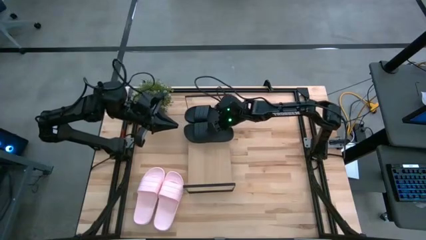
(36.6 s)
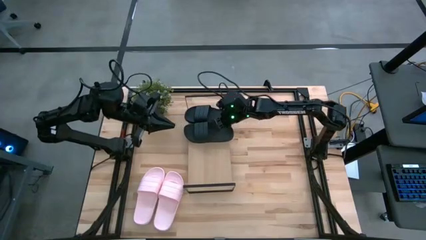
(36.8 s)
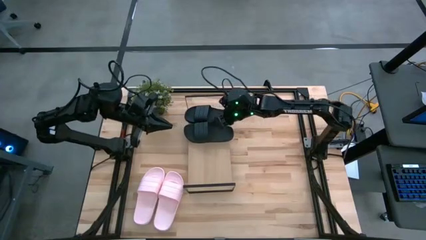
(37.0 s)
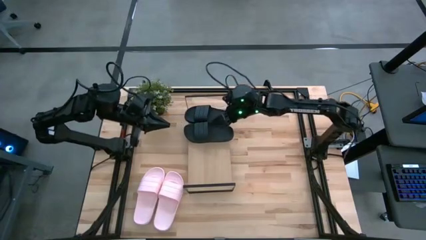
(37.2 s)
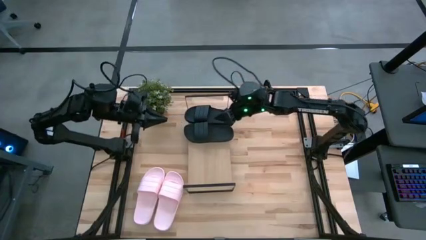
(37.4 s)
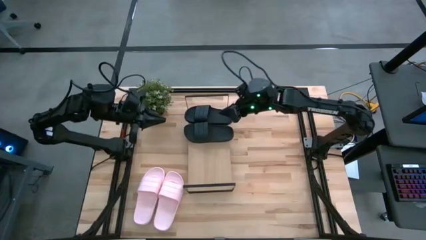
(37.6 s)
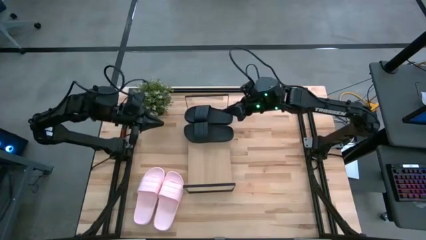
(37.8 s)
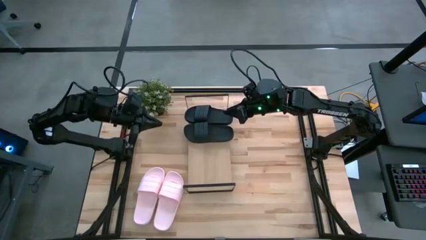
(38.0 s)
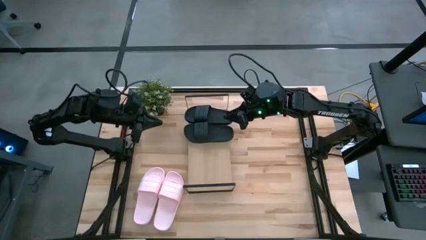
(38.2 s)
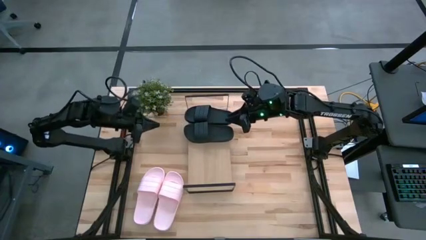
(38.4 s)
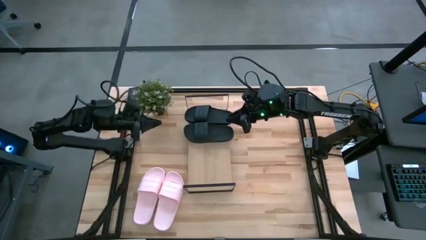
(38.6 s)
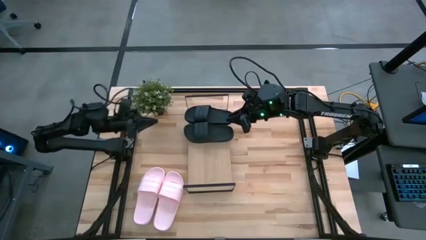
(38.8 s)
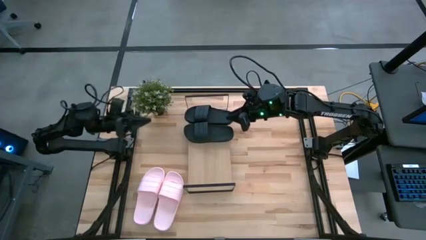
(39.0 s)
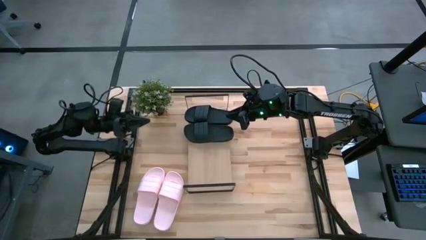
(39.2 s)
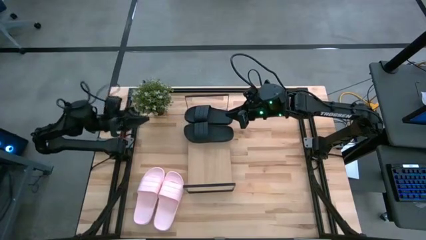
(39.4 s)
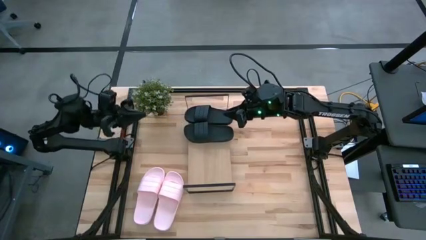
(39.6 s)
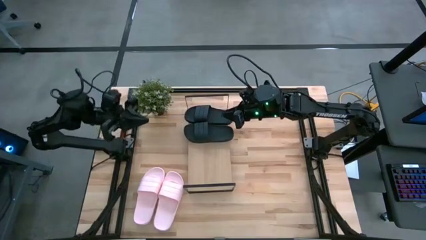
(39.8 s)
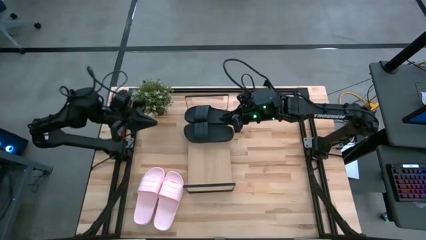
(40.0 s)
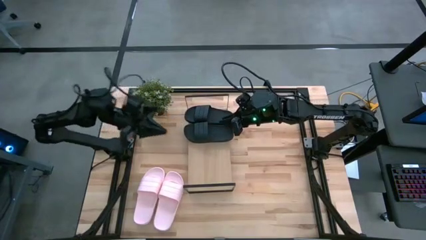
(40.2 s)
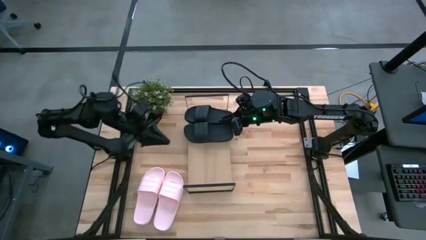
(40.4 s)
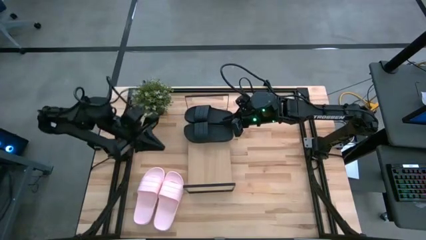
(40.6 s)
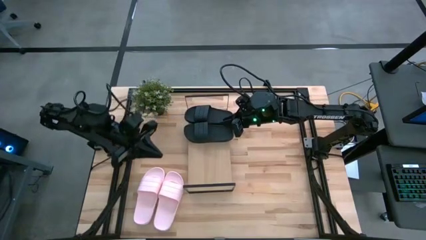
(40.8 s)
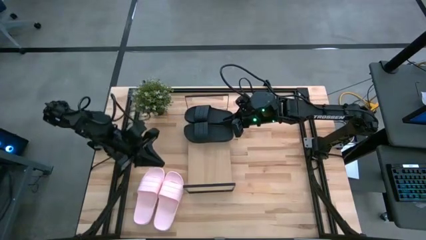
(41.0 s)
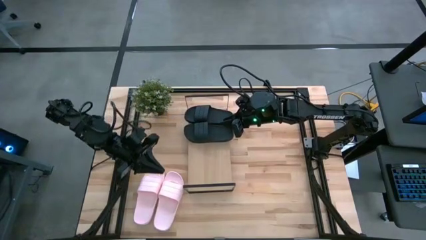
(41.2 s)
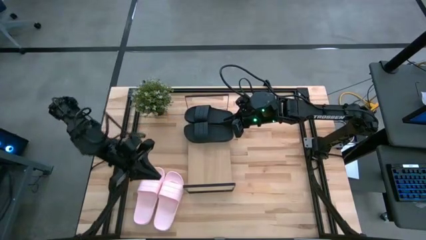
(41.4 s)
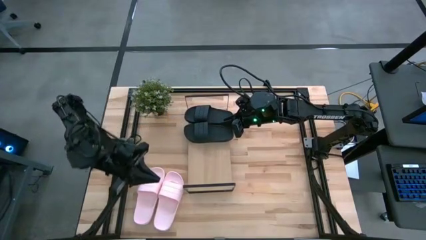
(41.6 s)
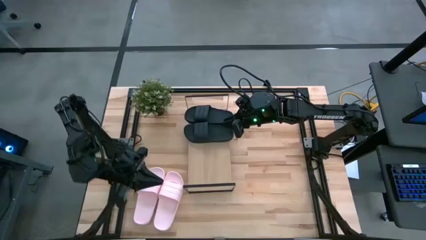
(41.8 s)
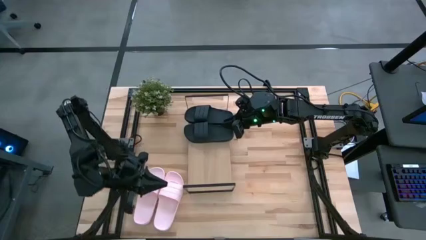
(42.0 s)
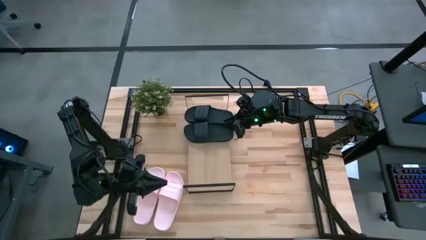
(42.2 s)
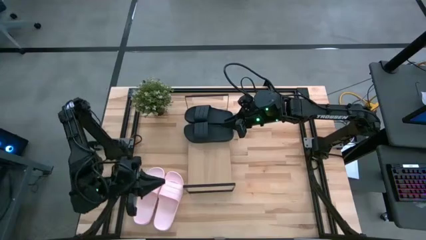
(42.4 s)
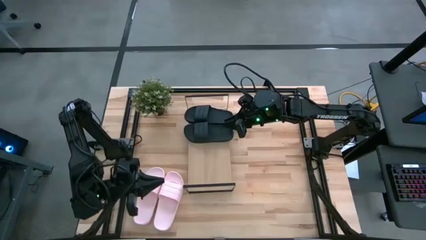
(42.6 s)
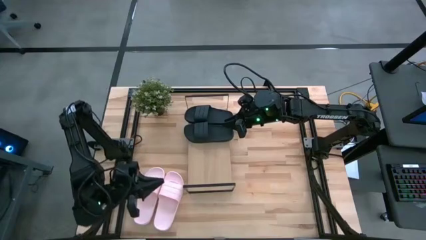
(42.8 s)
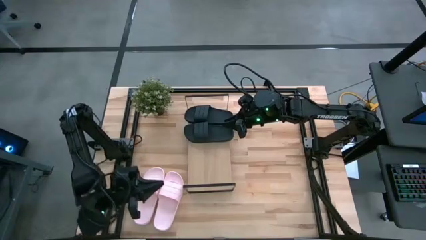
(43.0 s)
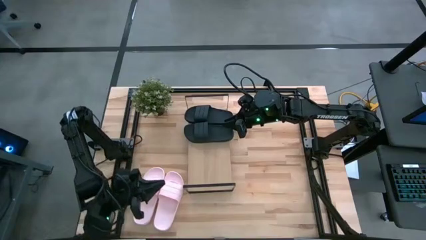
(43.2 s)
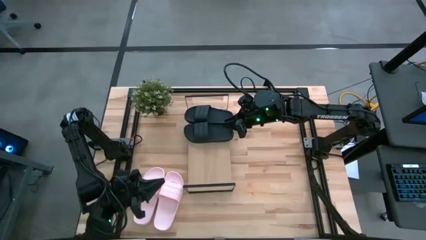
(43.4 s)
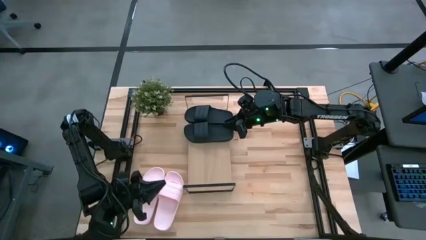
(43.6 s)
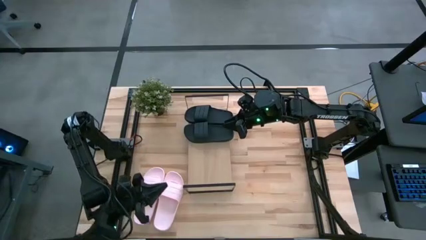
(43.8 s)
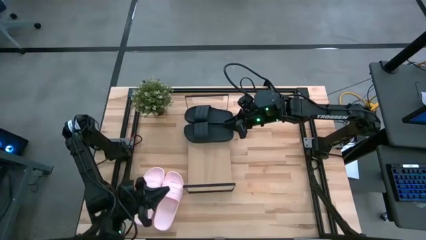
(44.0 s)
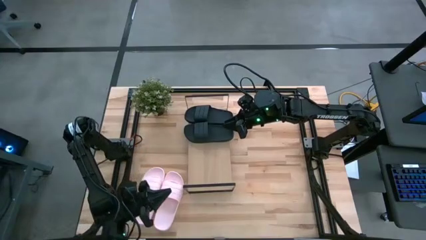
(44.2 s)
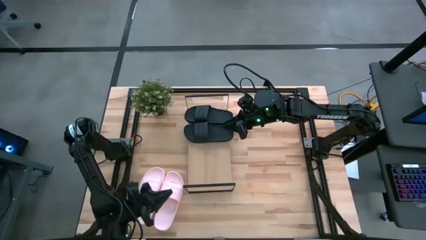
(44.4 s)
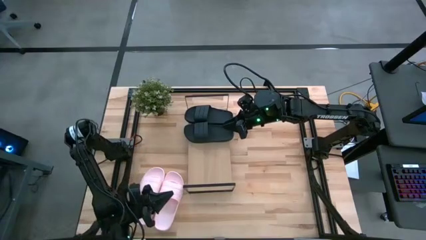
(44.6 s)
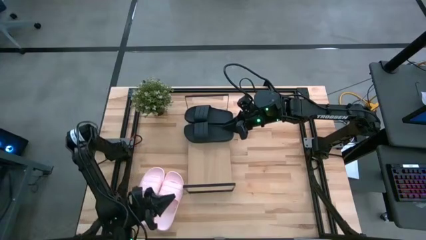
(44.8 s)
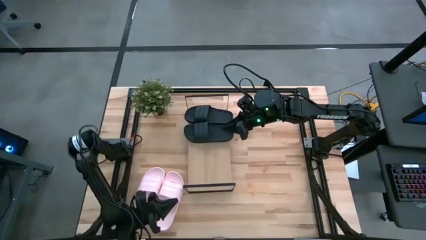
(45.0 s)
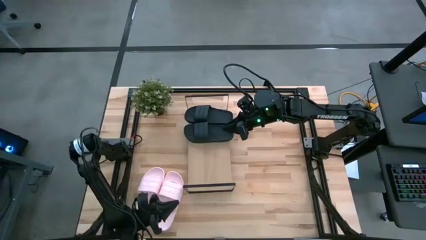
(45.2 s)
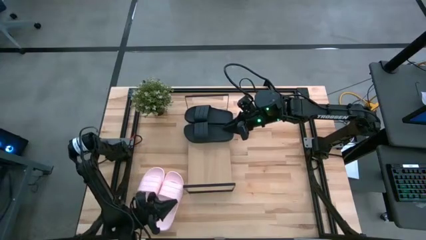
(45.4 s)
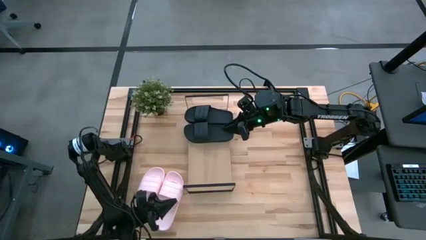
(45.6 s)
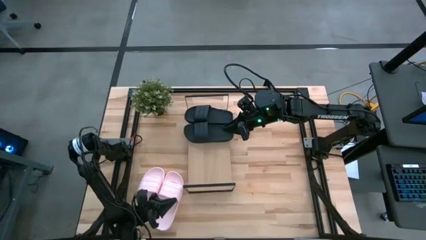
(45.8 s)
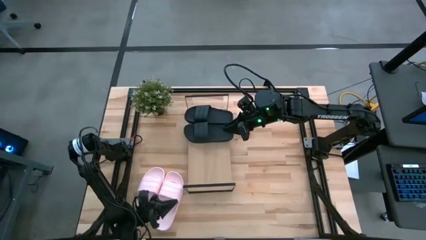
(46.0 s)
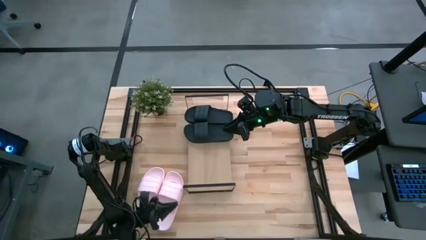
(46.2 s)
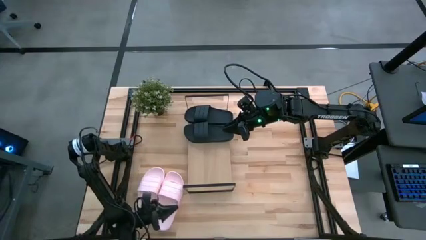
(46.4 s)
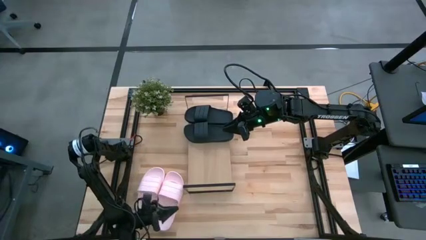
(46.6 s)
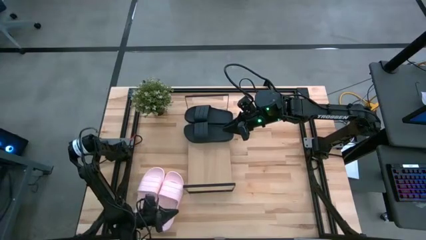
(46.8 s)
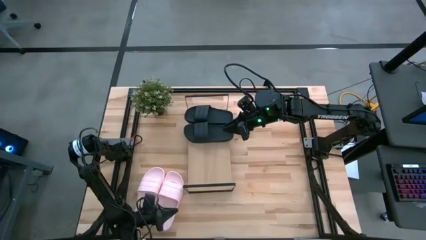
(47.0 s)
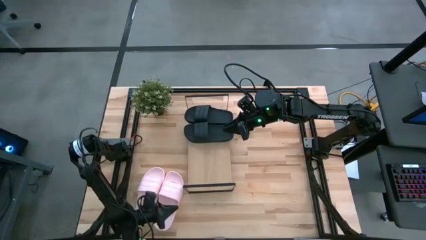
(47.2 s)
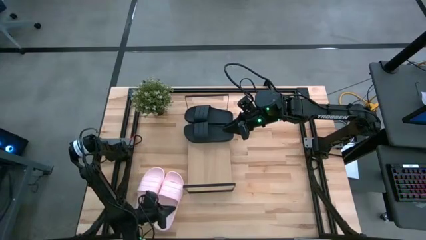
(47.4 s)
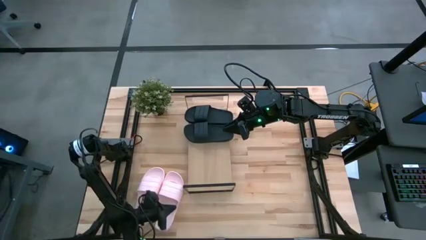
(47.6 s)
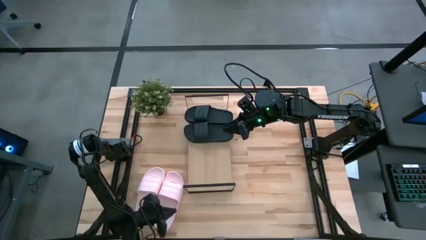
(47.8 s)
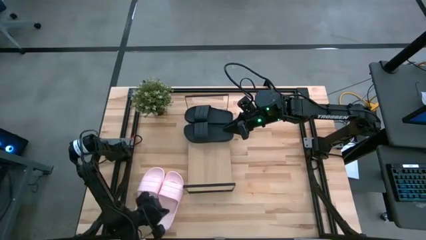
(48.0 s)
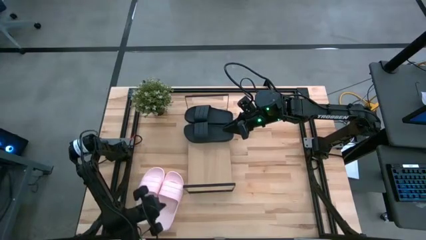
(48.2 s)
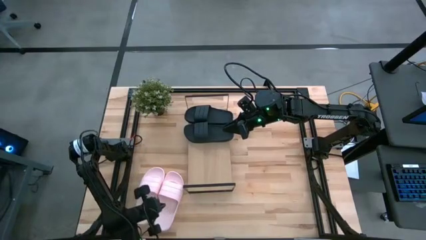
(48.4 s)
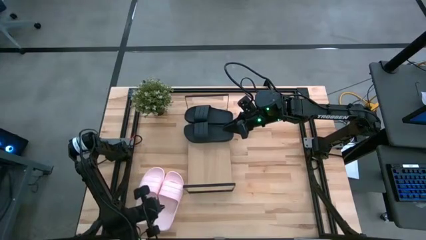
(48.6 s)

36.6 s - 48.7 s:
Task: Pick and place slides into the shelf
Put the right pink slide on the shelf
